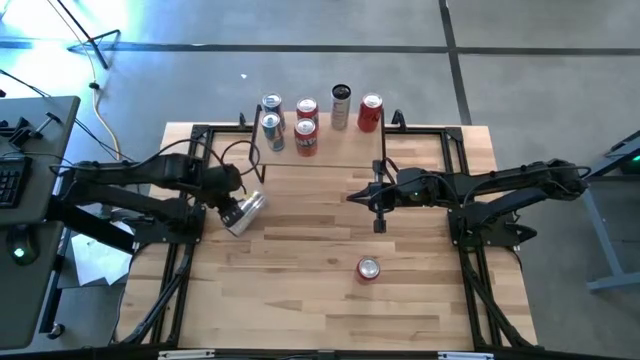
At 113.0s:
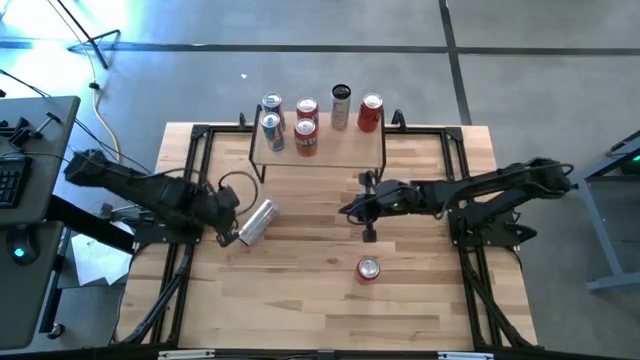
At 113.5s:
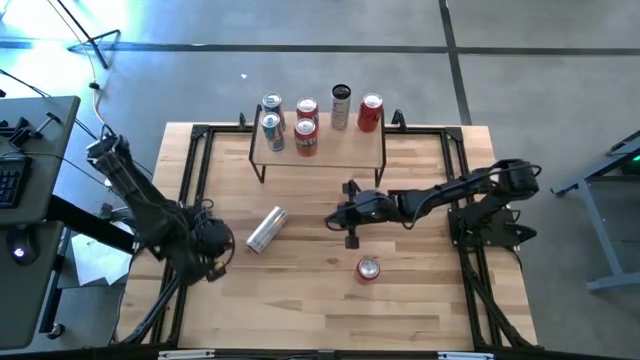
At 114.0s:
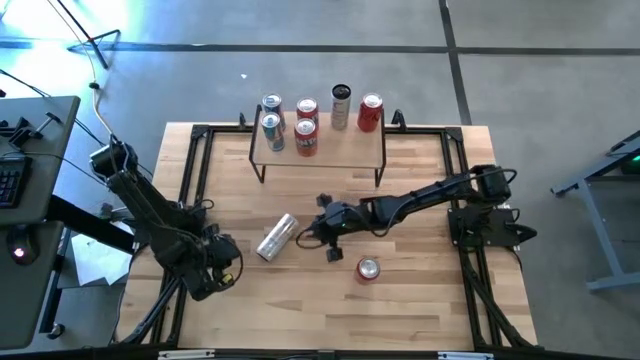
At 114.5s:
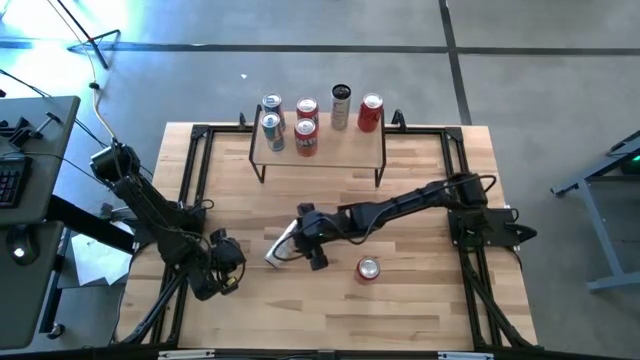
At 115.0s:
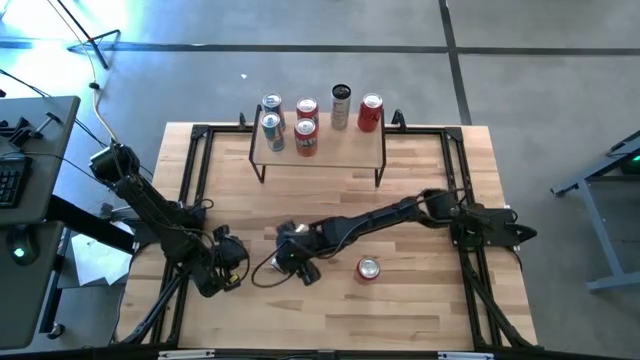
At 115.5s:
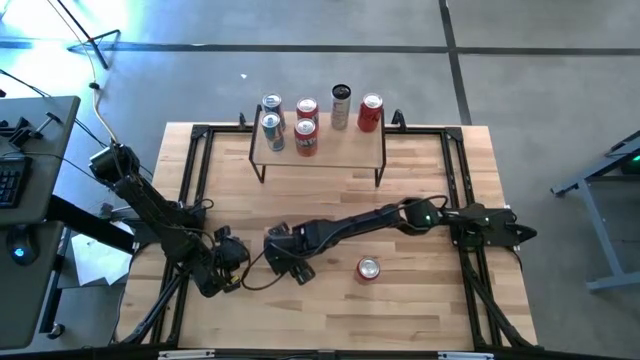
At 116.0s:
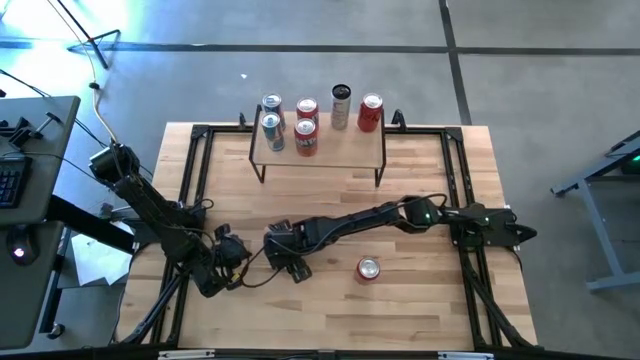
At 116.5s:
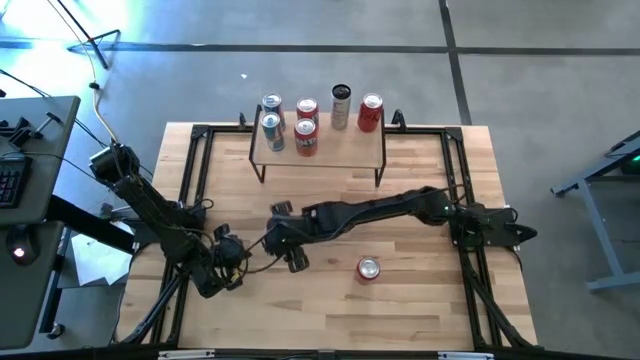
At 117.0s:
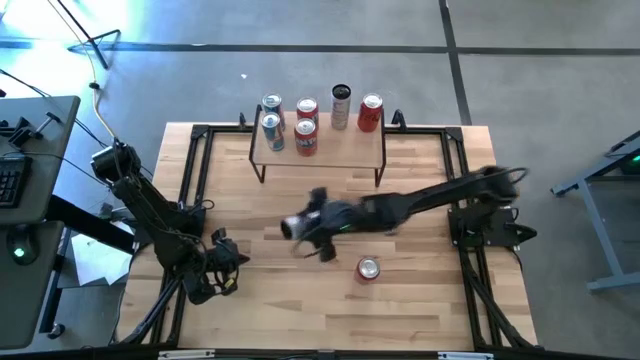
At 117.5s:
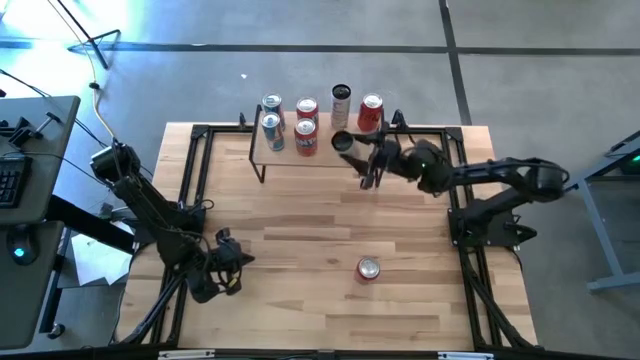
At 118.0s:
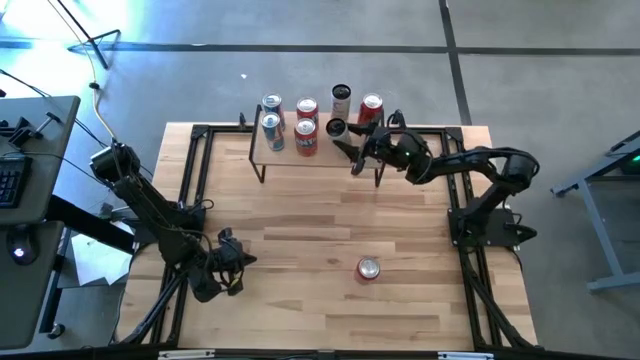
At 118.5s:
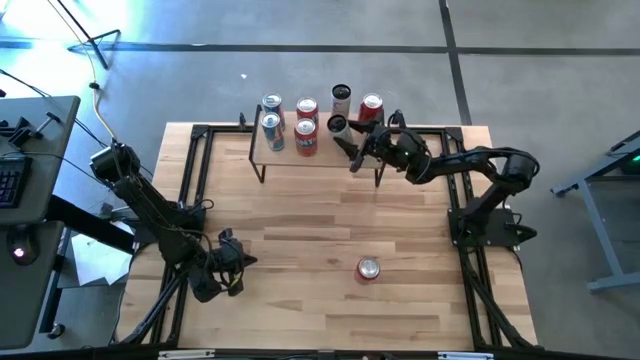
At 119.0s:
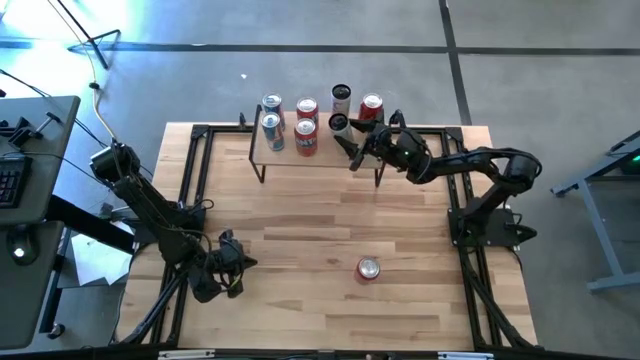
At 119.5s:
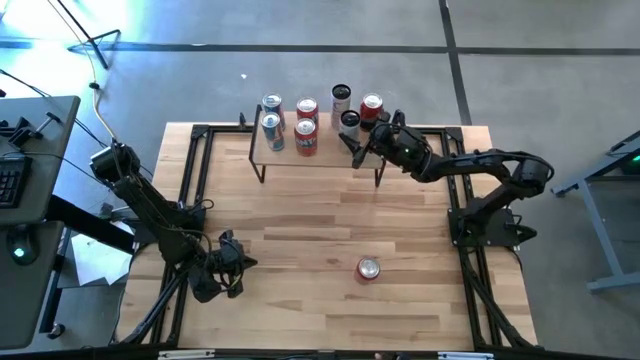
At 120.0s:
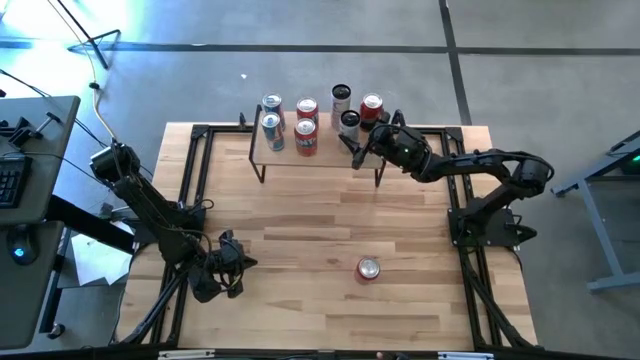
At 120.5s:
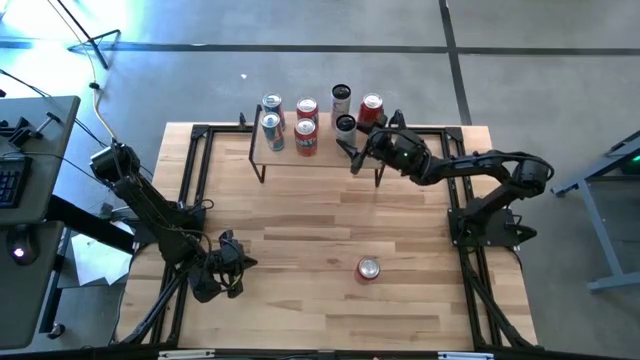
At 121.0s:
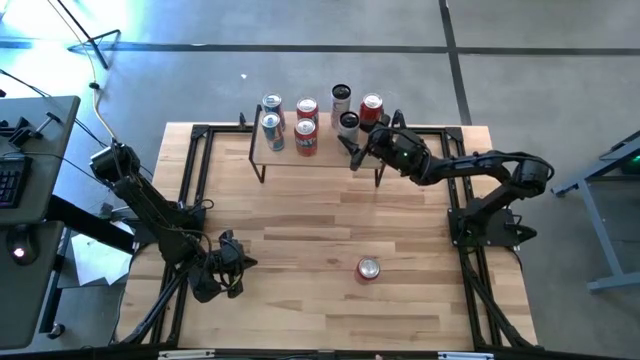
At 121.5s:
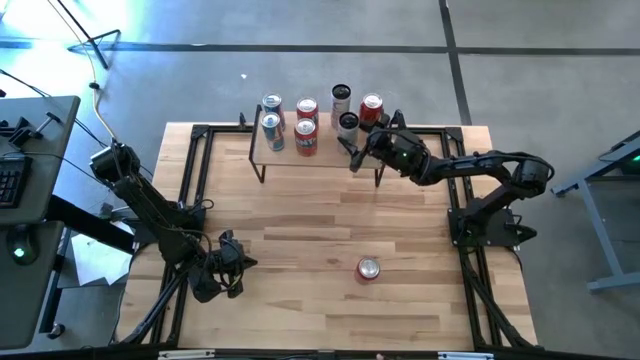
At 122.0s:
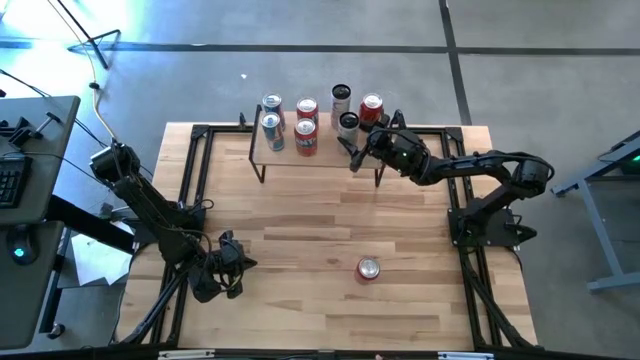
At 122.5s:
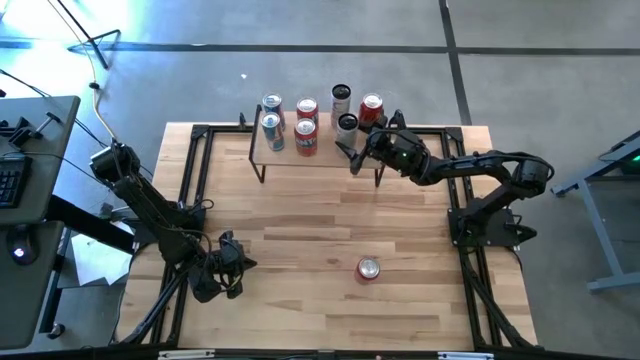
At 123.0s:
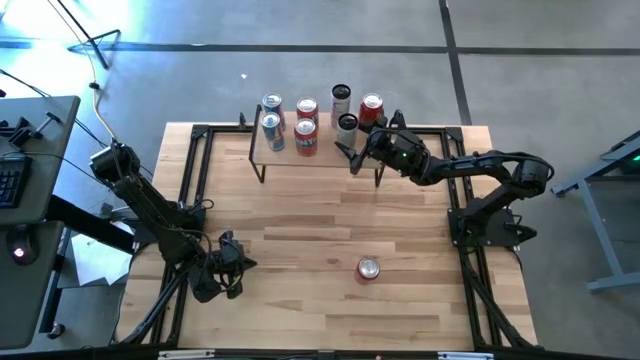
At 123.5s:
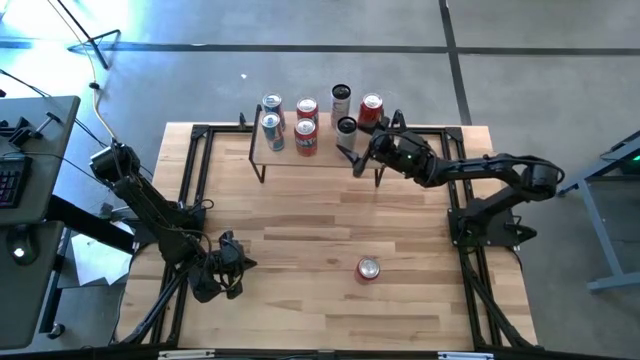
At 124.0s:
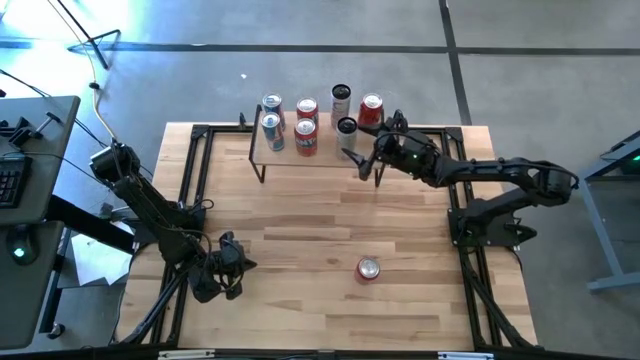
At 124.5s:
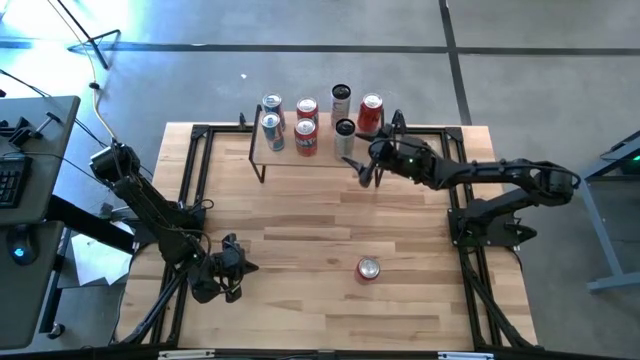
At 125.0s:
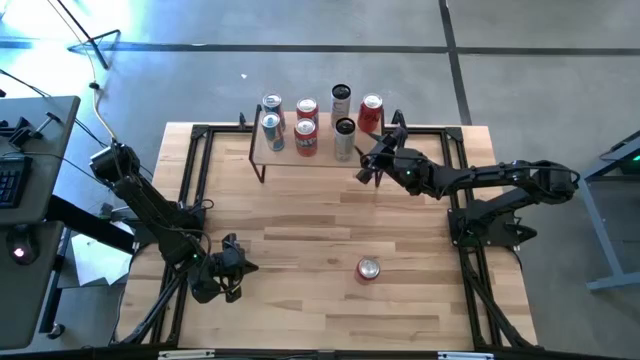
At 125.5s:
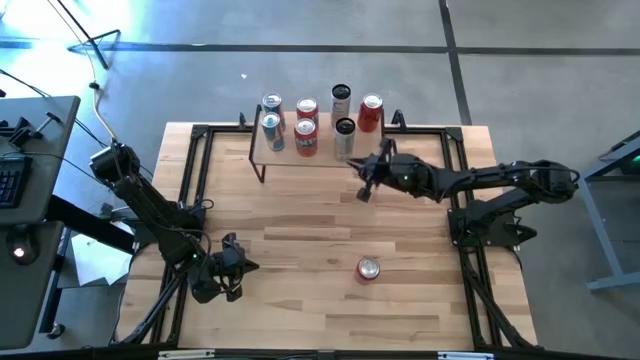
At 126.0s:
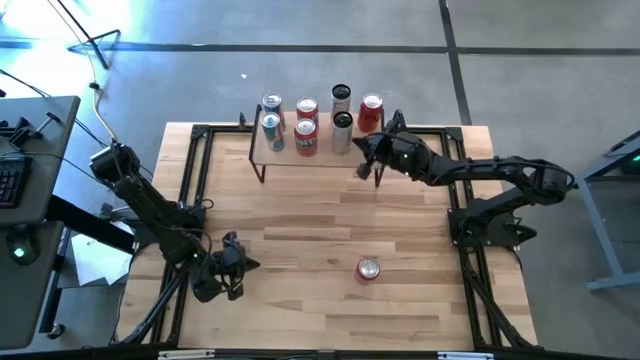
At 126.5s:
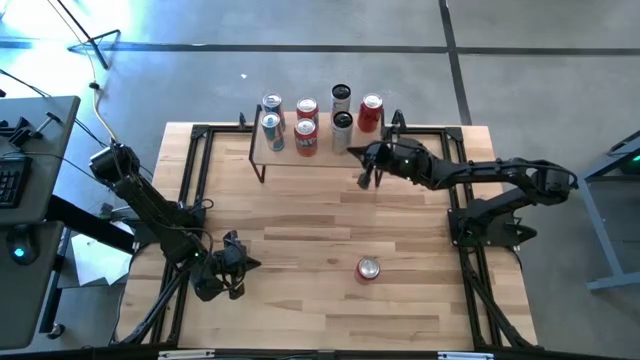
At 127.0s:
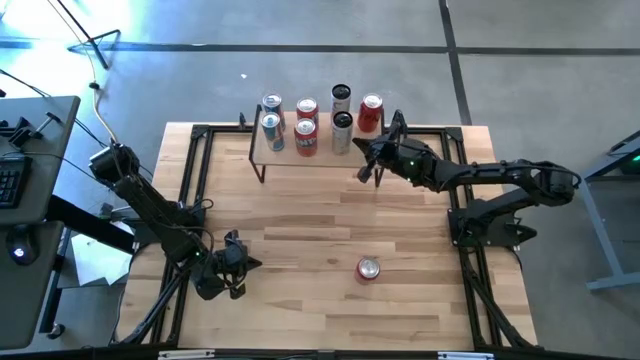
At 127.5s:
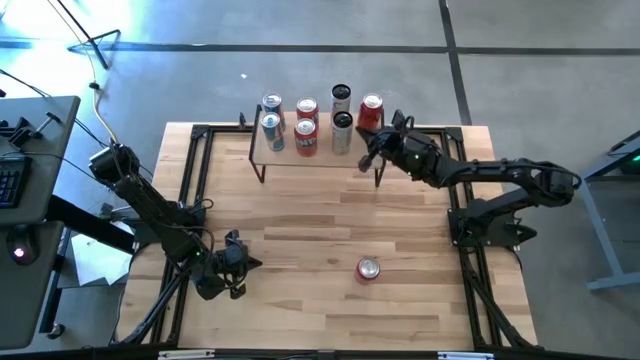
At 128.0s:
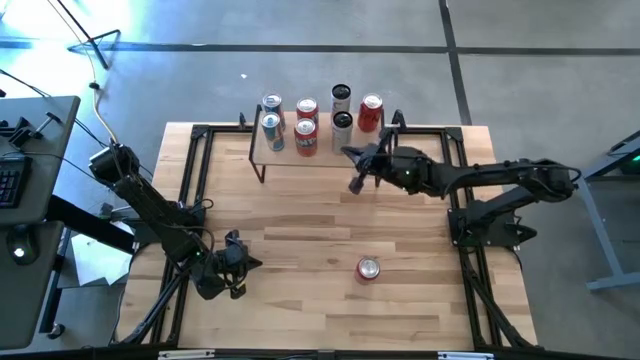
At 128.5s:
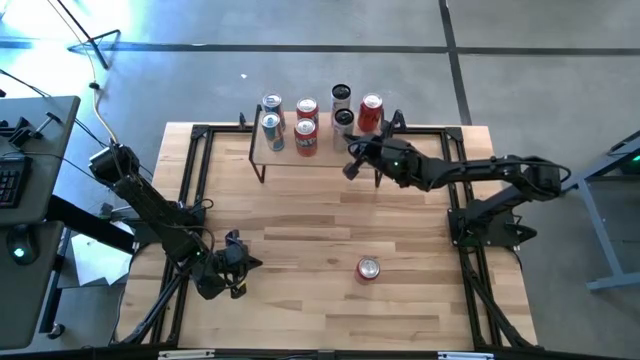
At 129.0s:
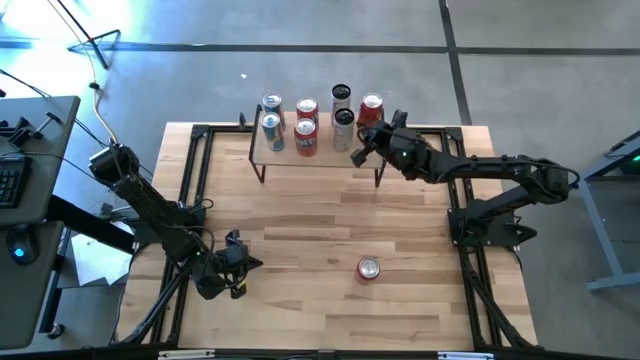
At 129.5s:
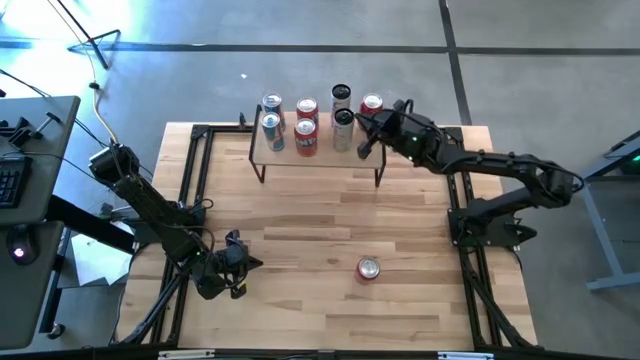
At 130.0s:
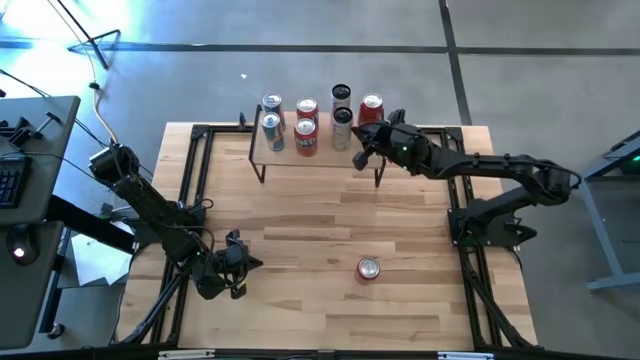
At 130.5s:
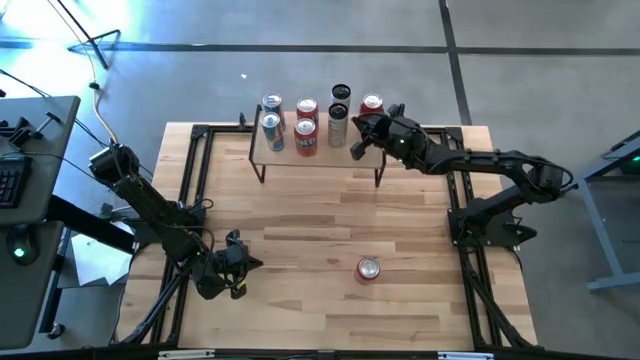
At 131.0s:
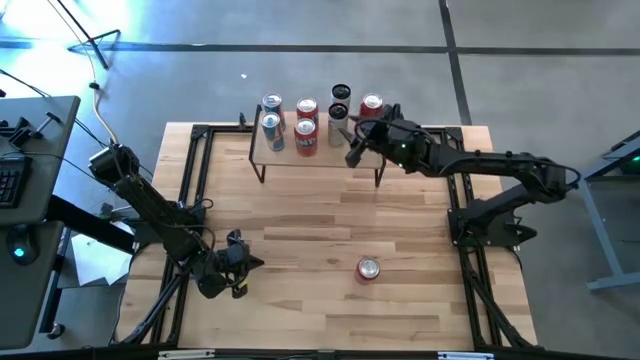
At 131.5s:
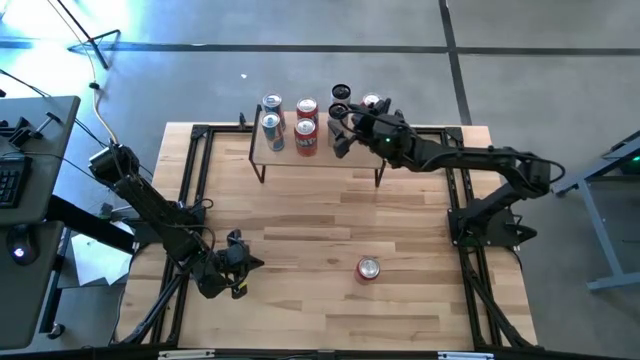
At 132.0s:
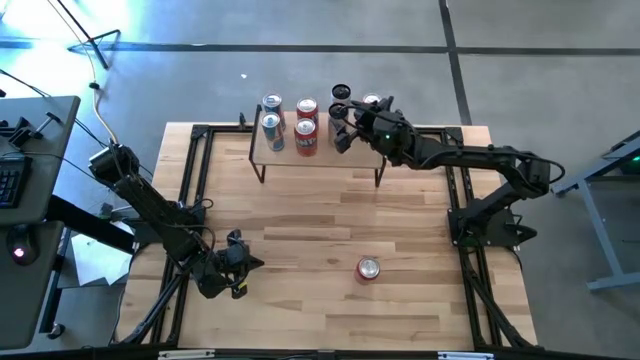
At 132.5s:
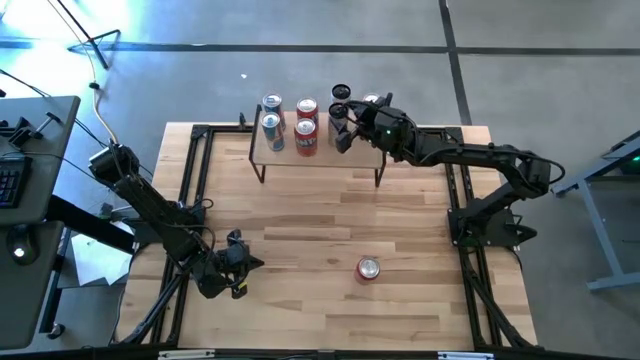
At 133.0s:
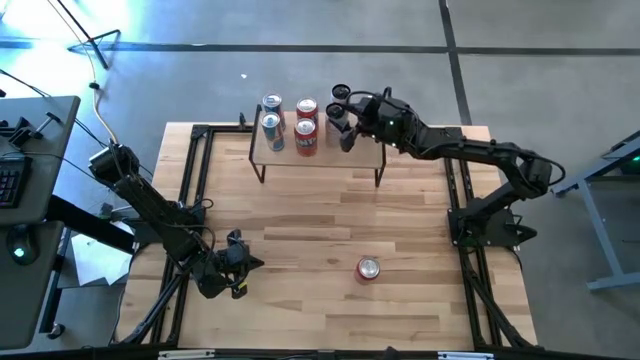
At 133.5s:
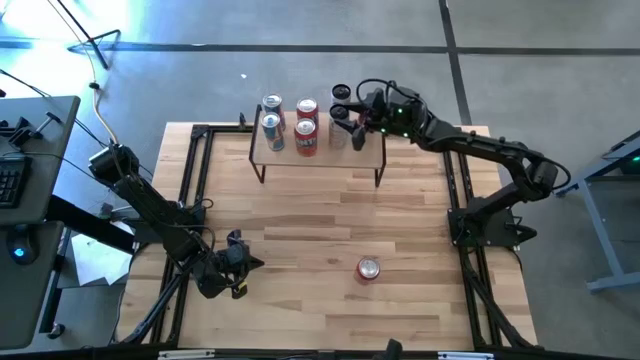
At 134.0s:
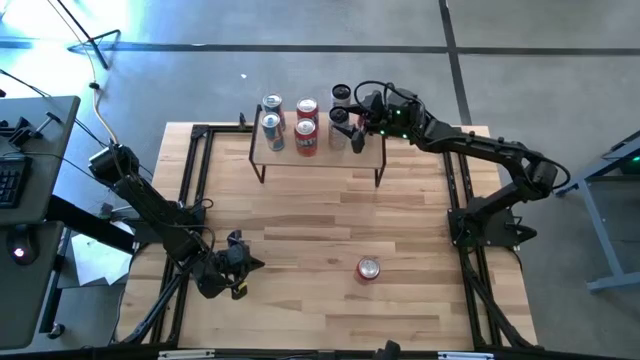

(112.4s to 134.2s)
Task: Place canned beverage on shelf
Put the white and yellow soda can on the shelf aligned with the other white and yellow soda can

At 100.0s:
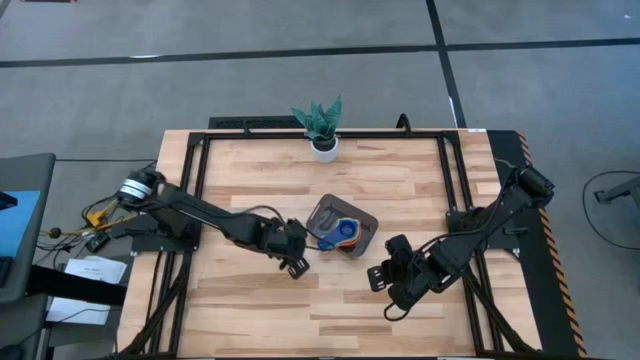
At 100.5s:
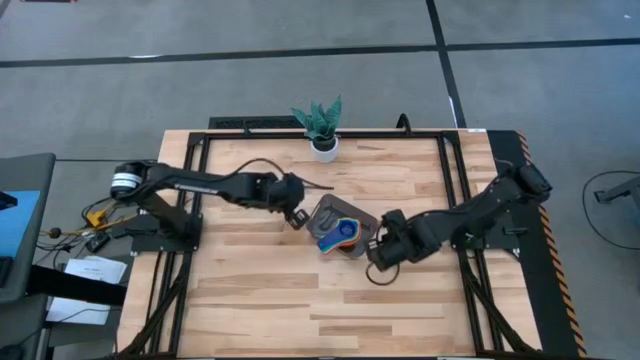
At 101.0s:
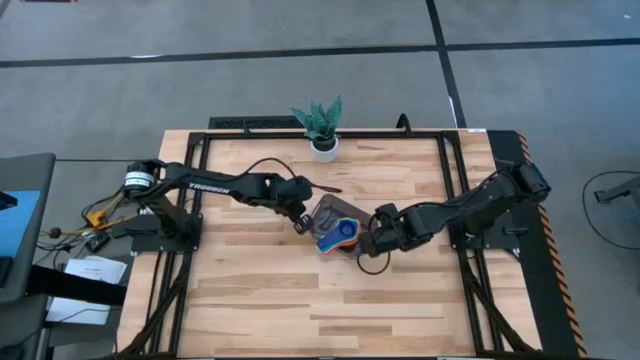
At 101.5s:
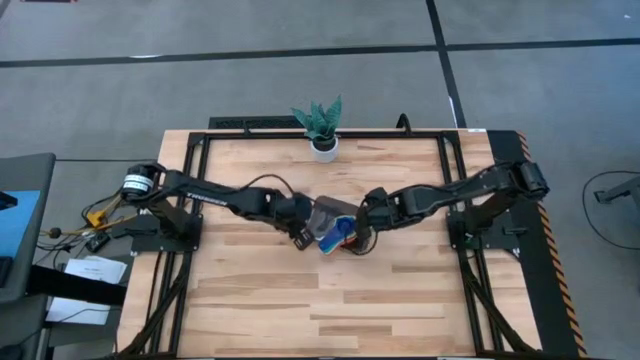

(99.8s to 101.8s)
Task: Nest measuring cups in basket
Adjust the black bin
